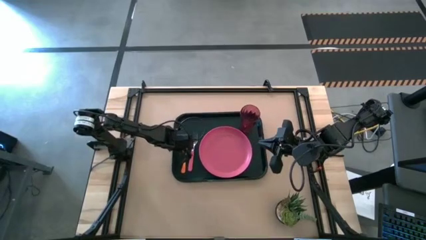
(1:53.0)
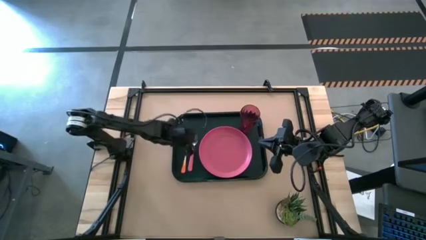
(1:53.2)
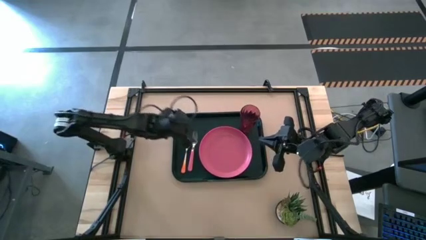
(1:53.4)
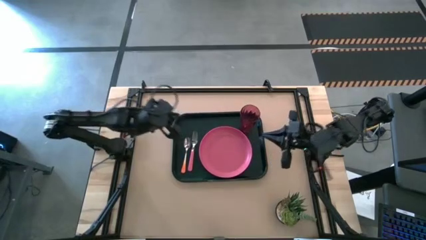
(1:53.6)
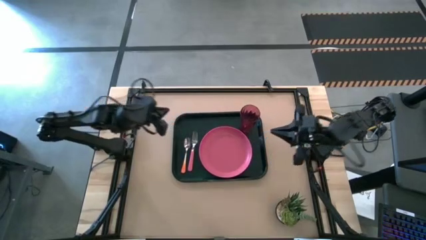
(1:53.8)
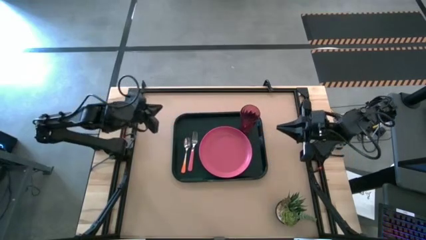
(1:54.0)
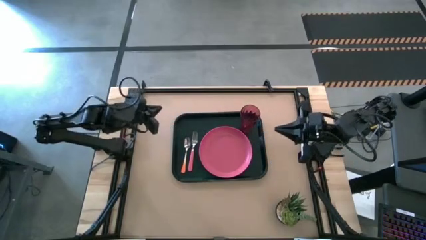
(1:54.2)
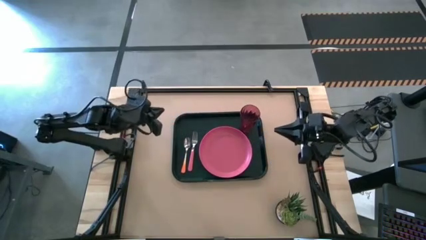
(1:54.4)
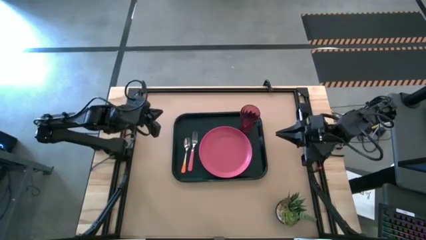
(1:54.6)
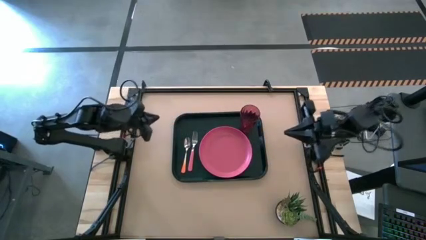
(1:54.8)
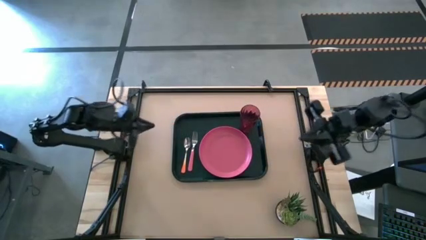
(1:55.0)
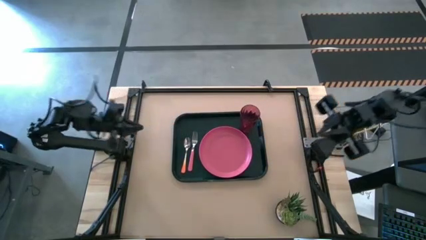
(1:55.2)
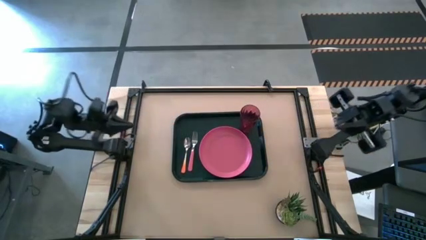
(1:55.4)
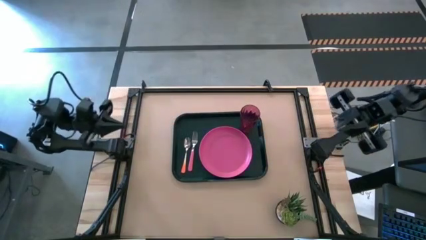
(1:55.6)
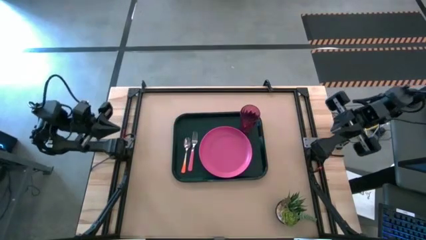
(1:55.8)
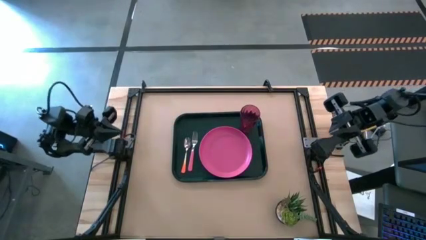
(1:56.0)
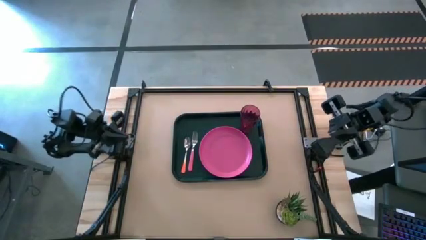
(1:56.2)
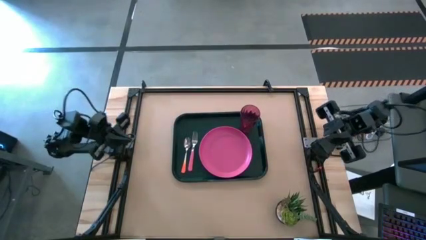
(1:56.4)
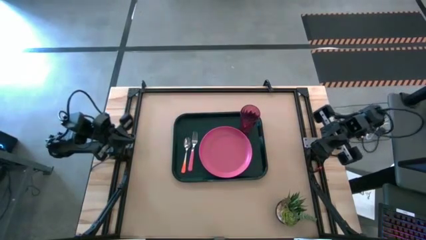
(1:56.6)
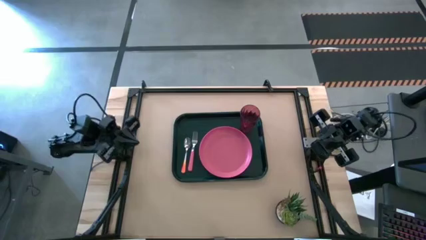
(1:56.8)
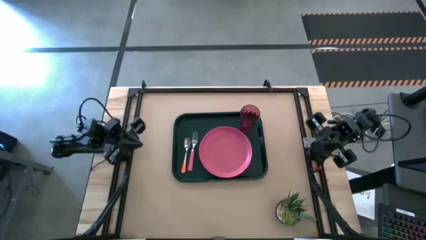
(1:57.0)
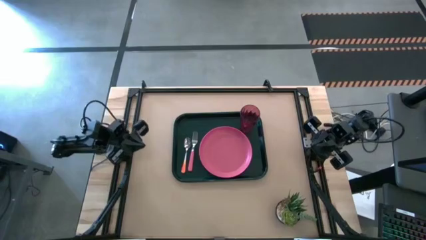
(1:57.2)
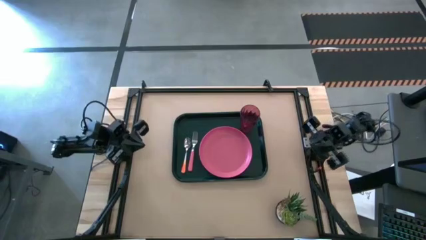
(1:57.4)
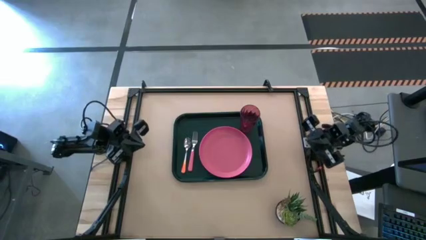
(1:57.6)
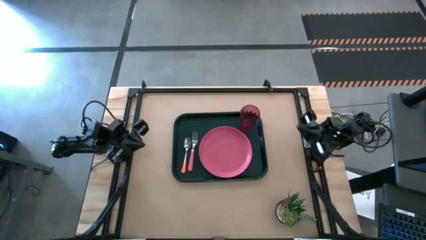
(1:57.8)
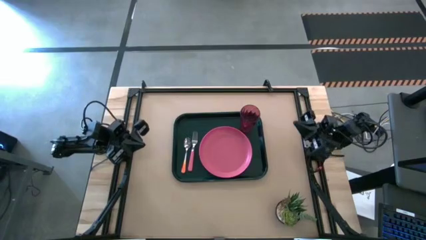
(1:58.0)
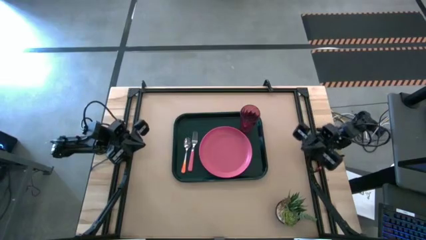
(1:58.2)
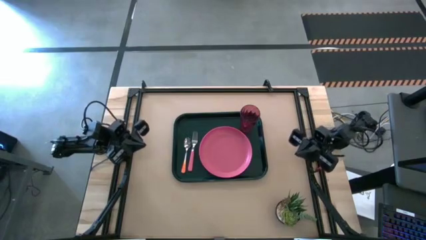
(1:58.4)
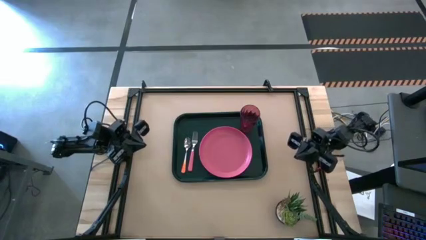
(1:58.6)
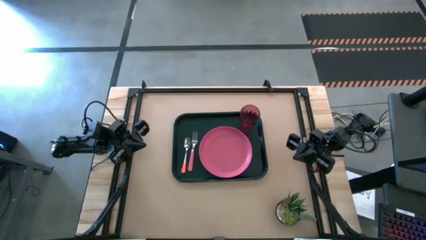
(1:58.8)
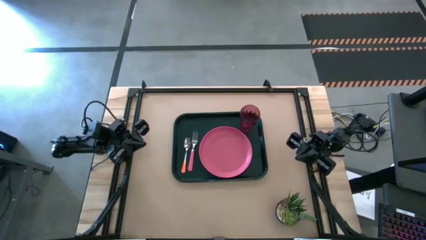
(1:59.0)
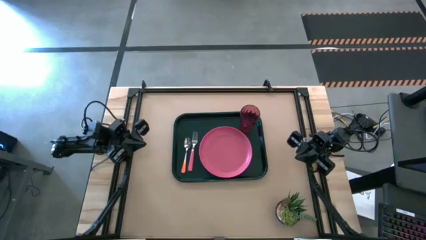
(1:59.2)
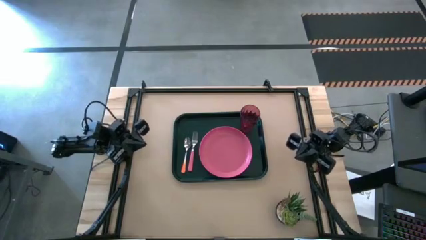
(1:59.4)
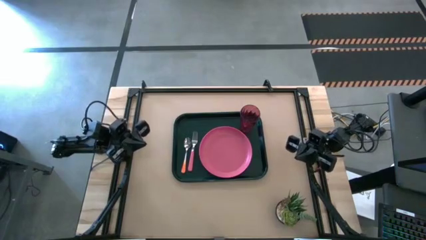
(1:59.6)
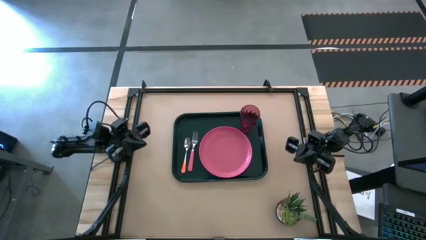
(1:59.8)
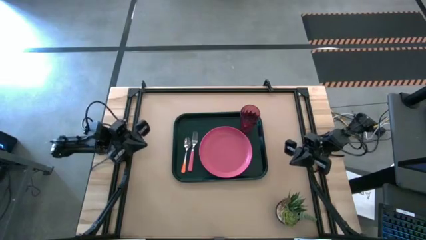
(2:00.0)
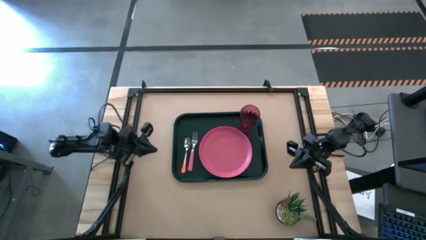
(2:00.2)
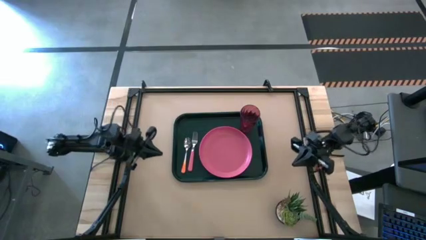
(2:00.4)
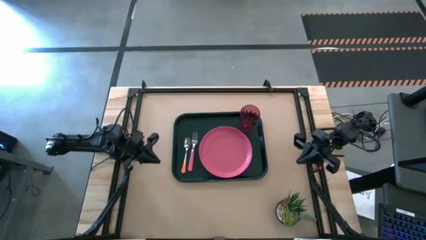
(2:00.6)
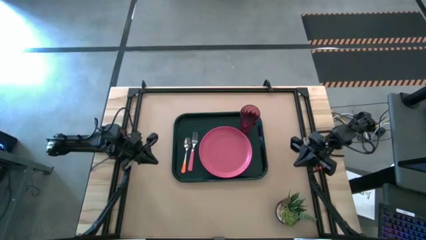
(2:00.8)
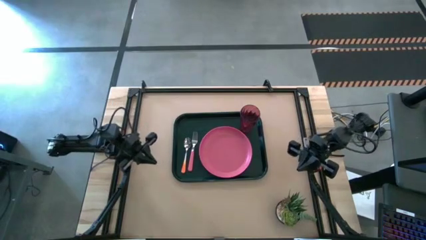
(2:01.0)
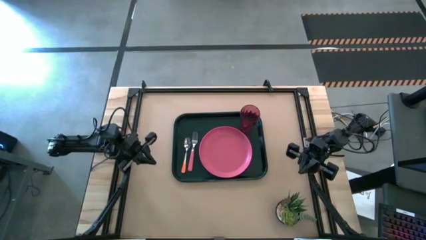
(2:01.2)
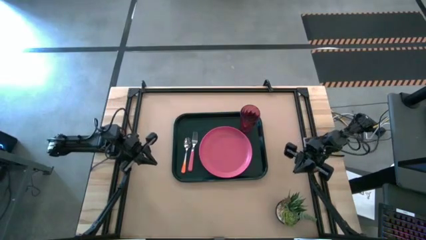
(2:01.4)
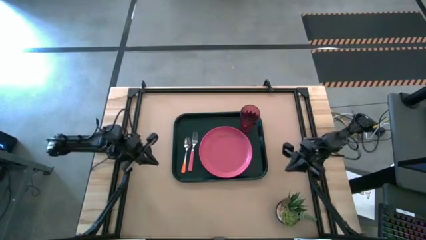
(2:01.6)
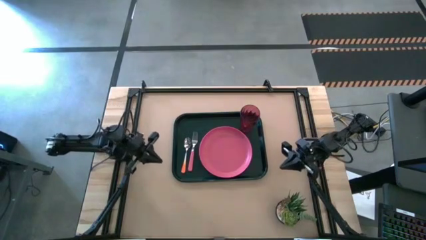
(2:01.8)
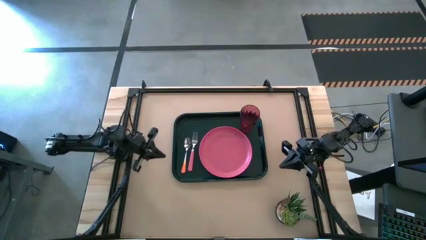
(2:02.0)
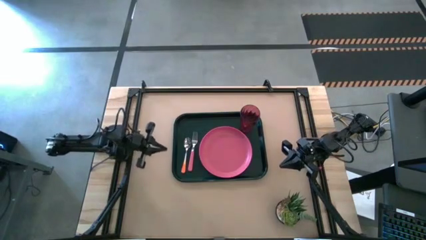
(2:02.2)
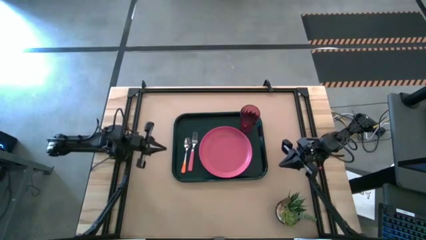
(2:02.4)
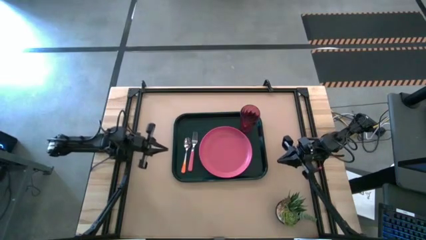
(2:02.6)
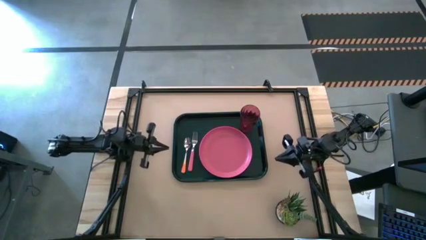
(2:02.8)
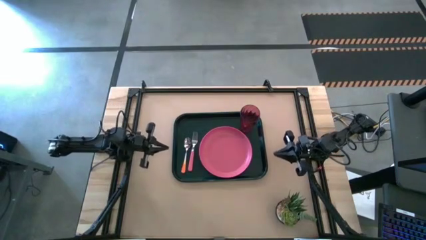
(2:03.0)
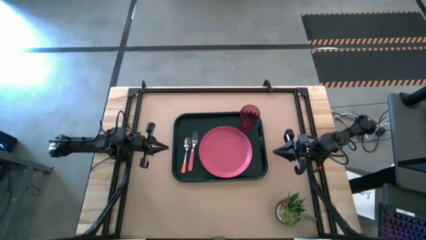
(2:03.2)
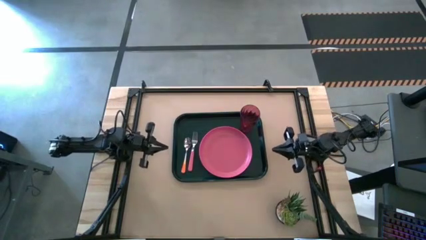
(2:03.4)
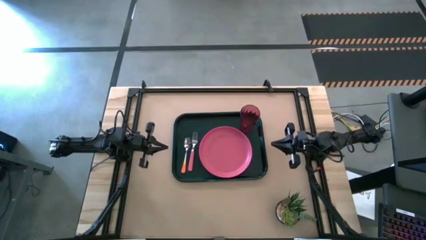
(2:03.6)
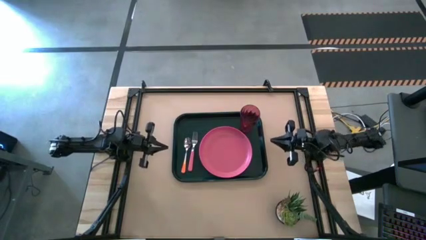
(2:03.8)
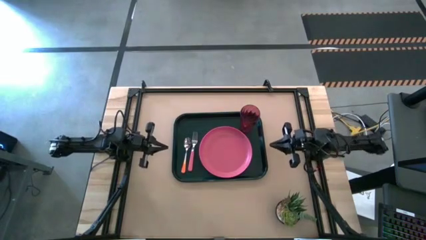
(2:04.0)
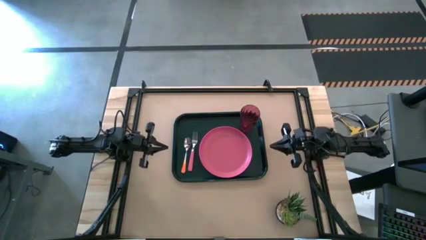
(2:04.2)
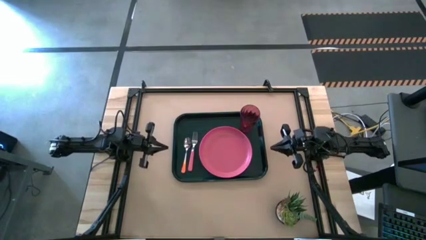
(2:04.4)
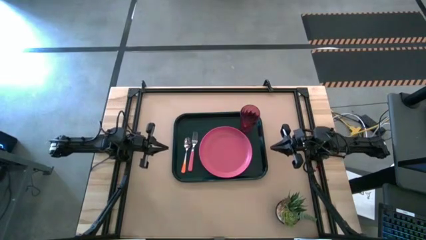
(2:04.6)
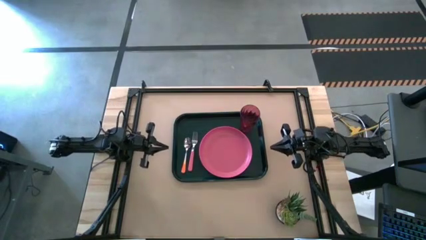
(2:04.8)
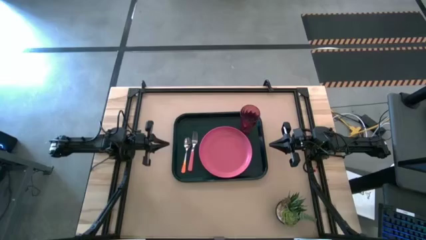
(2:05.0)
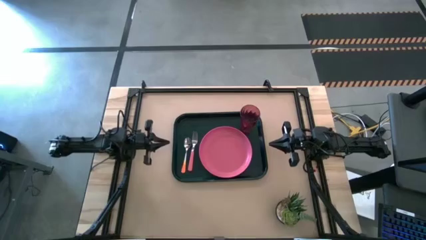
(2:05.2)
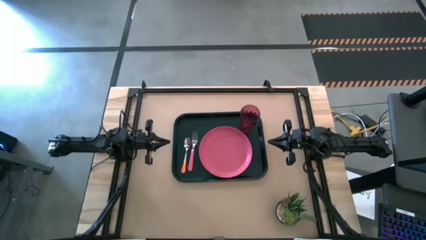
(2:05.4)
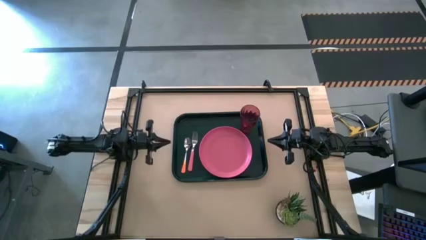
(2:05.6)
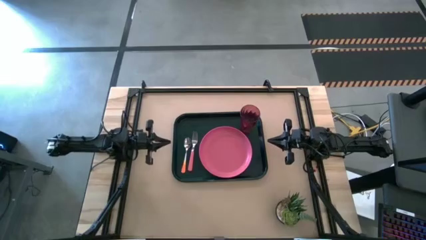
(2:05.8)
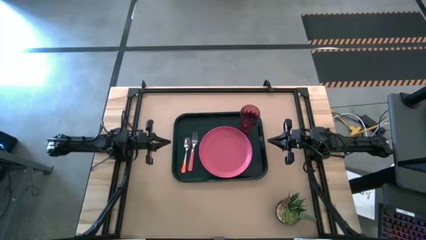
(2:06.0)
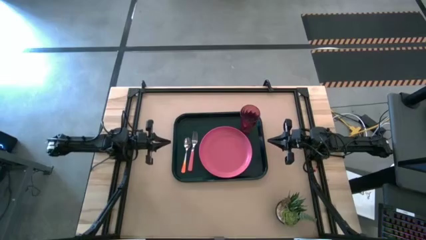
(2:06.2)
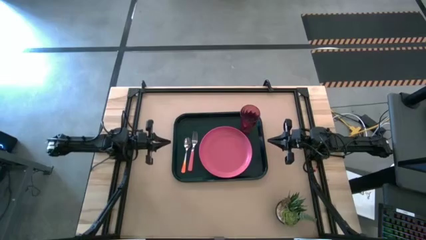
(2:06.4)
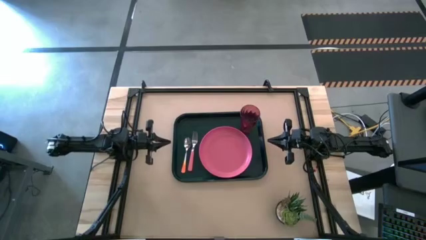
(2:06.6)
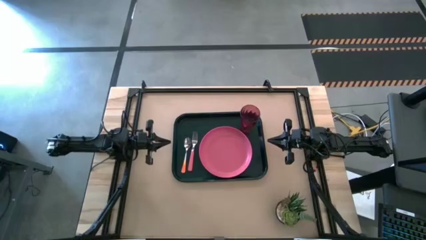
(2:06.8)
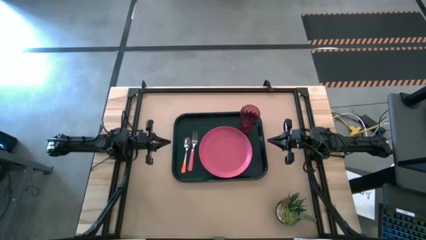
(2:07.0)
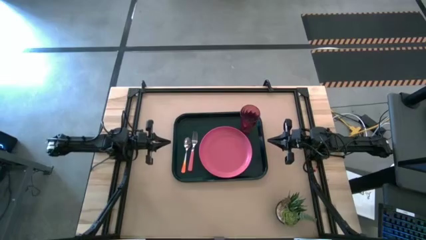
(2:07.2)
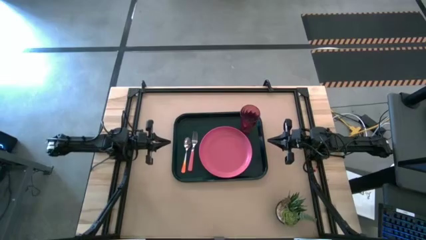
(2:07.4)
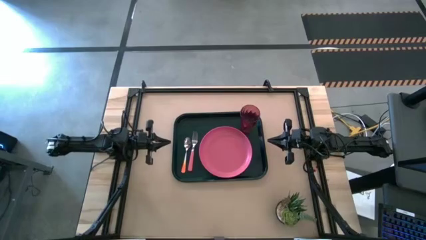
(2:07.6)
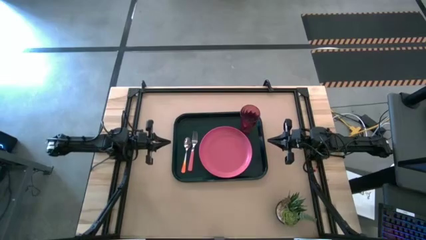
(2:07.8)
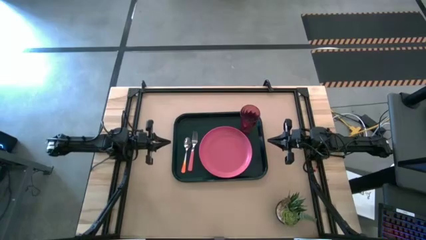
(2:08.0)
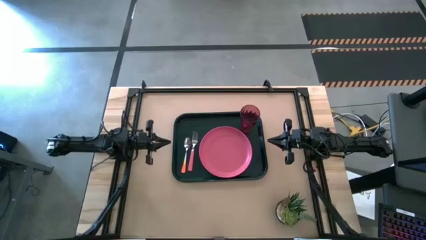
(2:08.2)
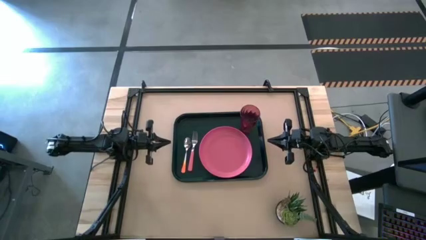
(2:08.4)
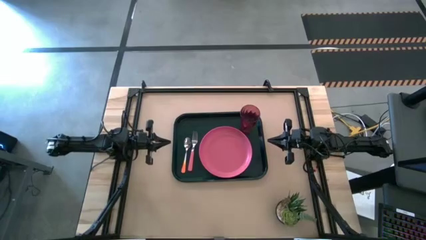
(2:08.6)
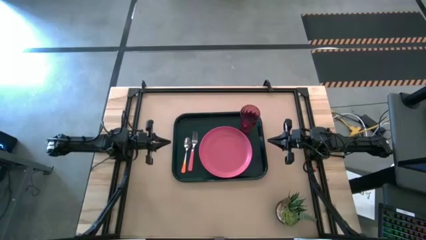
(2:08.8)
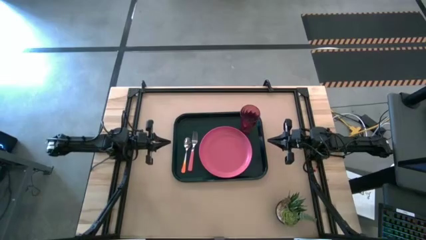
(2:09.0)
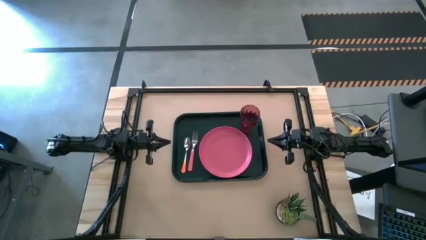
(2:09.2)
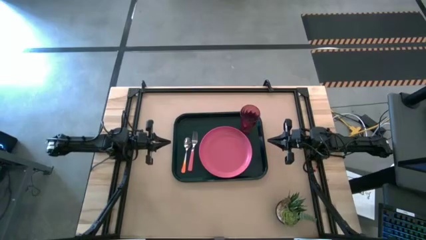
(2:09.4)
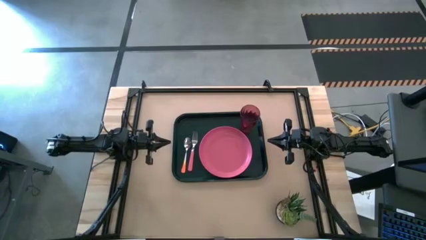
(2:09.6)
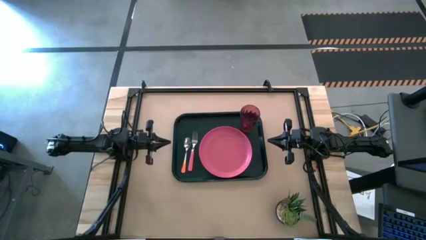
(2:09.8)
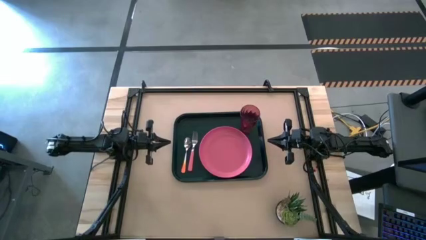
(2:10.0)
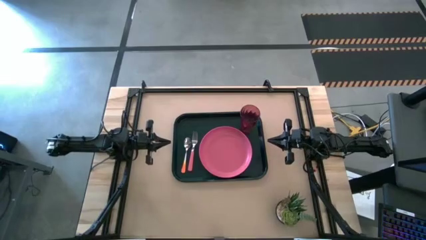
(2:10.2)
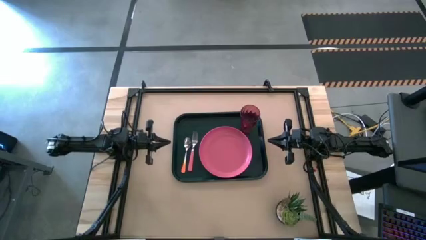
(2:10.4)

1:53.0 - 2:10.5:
Task: Pick and place plate/cup/fork/spoon on tray
Return to Home Position
